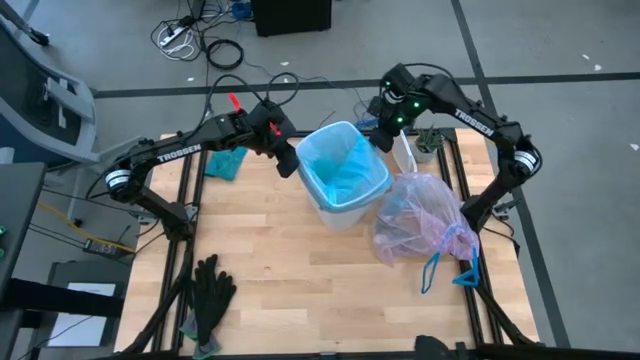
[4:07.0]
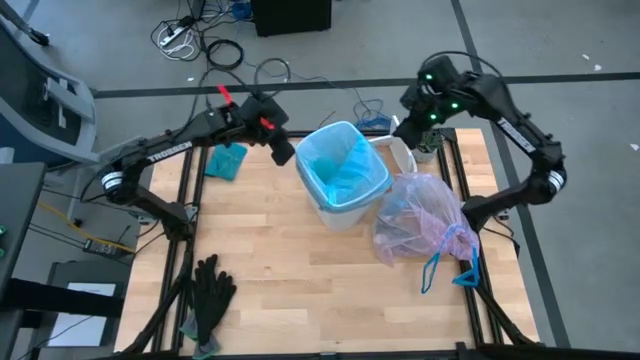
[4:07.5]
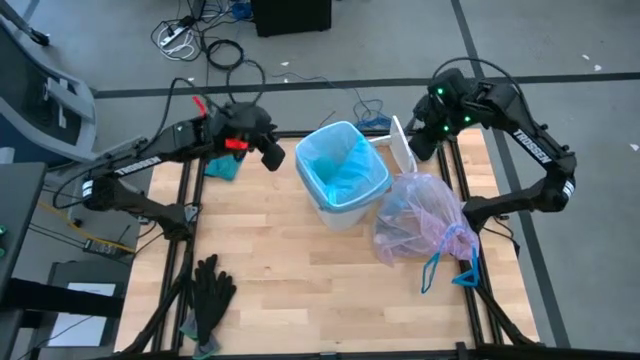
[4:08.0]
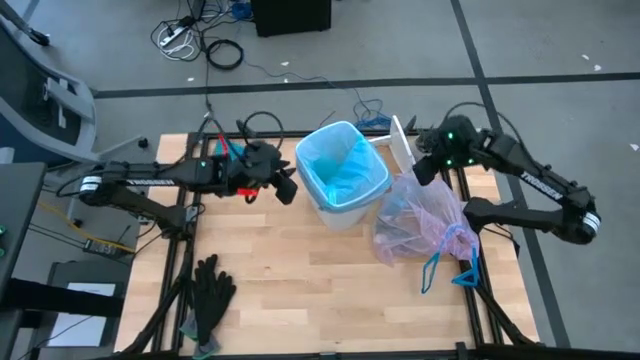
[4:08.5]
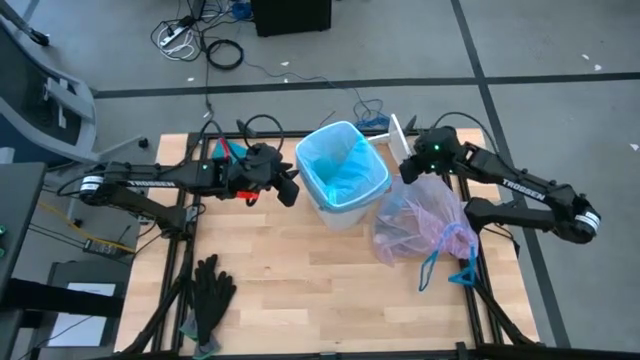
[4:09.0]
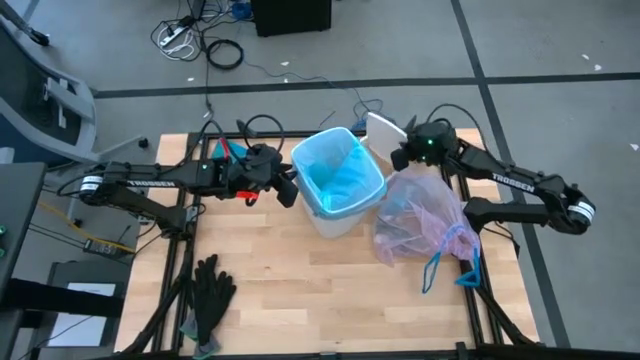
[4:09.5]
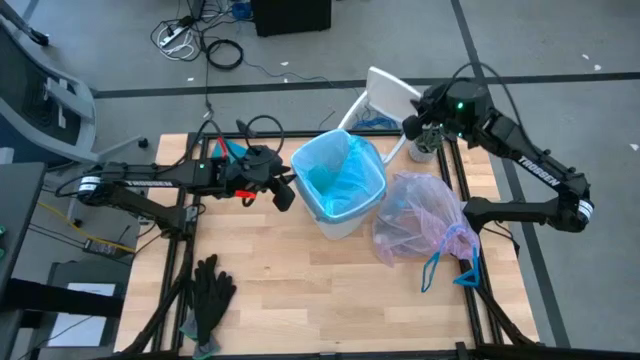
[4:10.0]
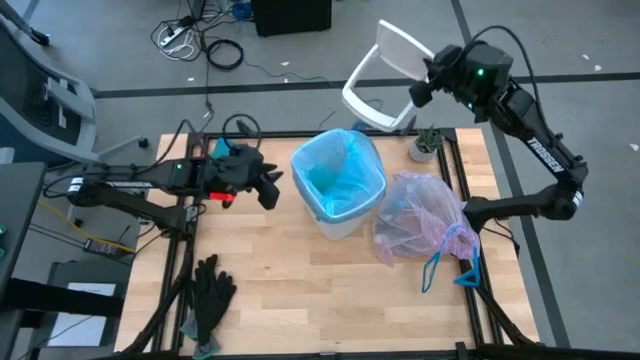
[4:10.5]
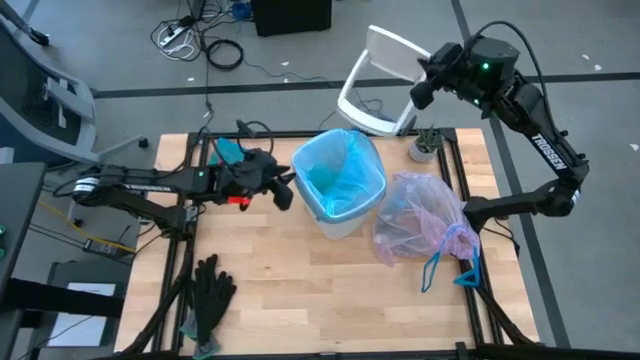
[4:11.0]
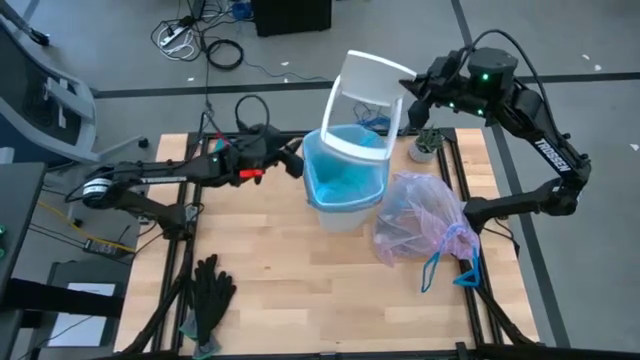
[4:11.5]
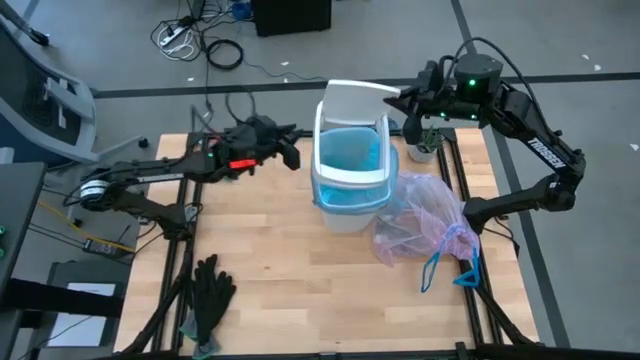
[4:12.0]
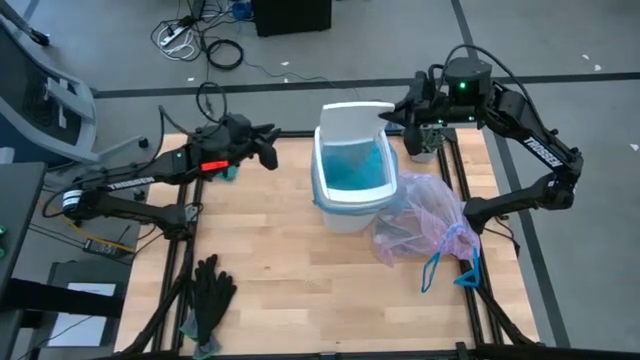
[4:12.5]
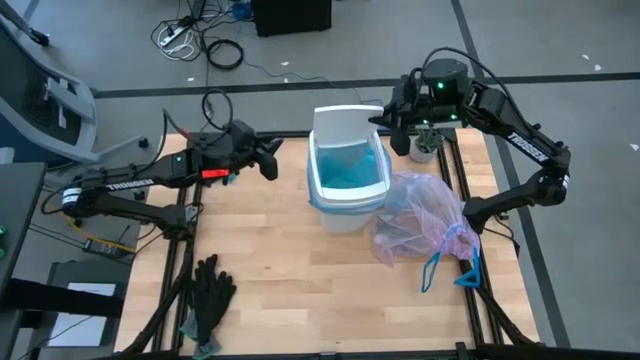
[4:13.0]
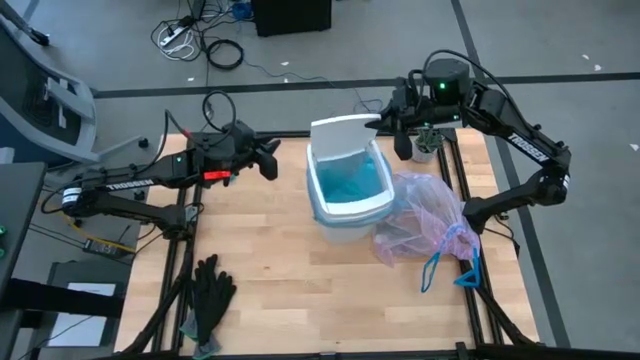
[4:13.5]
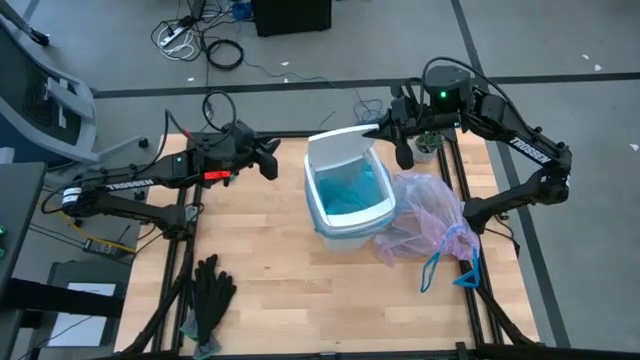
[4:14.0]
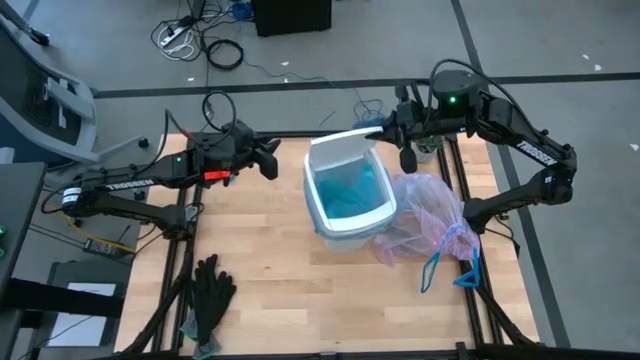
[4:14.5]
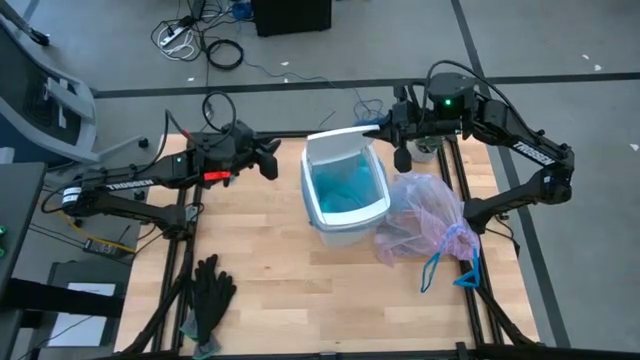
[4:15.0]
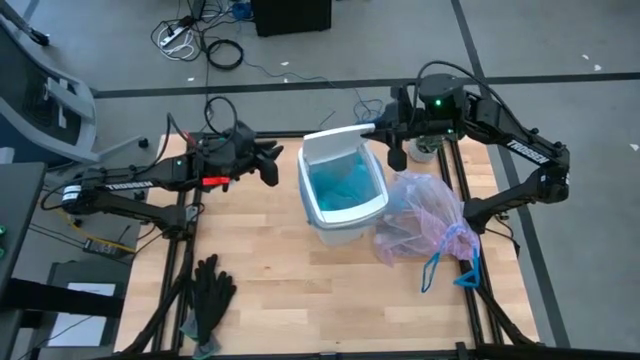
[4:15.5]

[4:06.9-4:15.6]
Task: place trash/remove bag and relplace
Put the white trash bin cover into the top of the trash bin

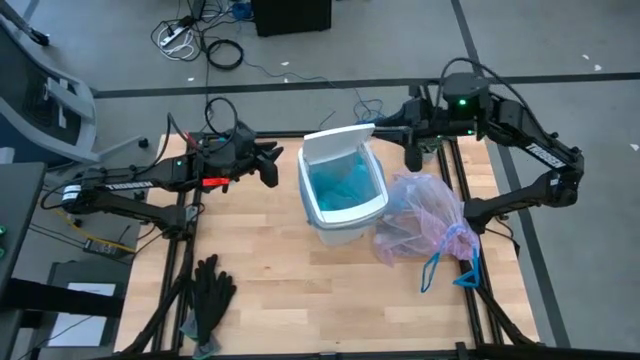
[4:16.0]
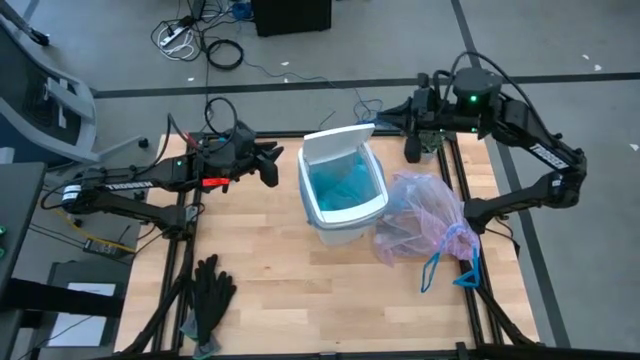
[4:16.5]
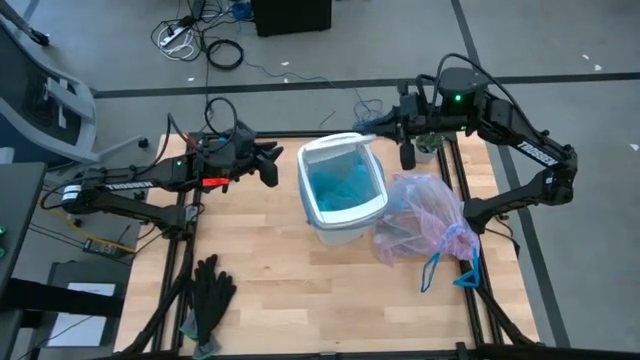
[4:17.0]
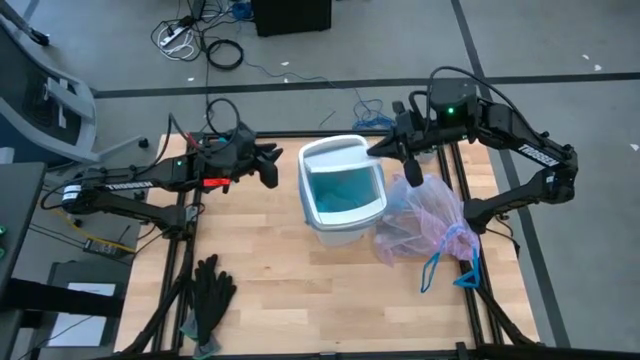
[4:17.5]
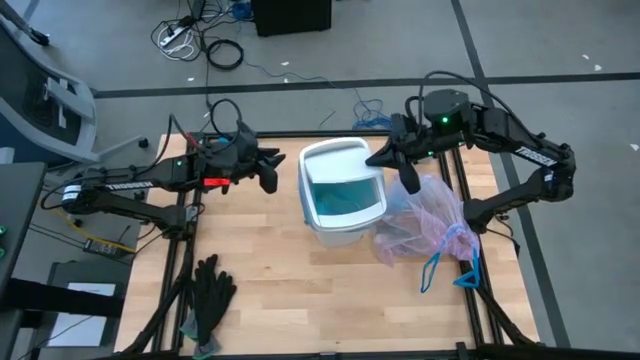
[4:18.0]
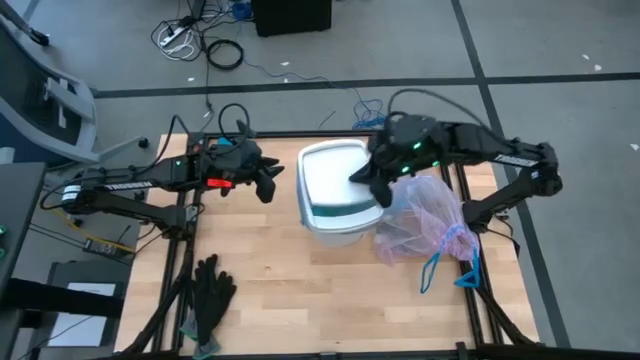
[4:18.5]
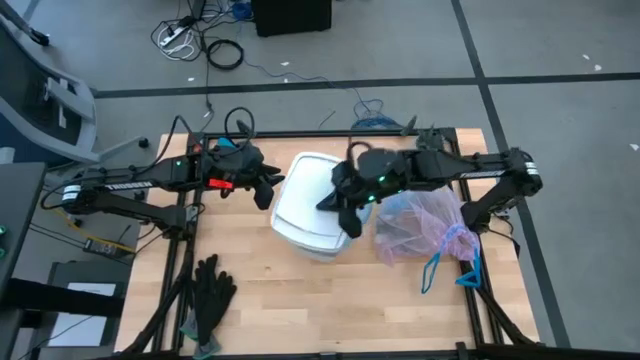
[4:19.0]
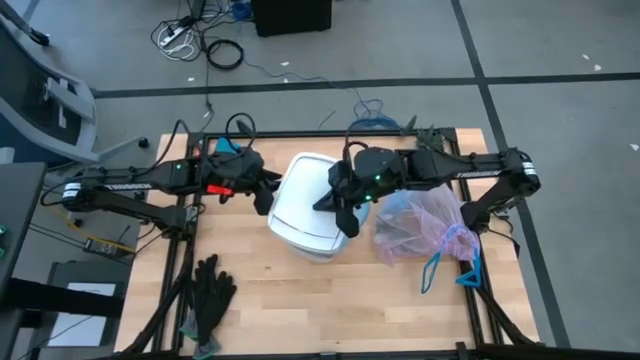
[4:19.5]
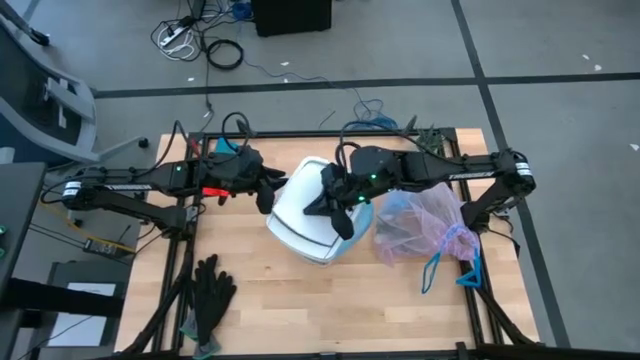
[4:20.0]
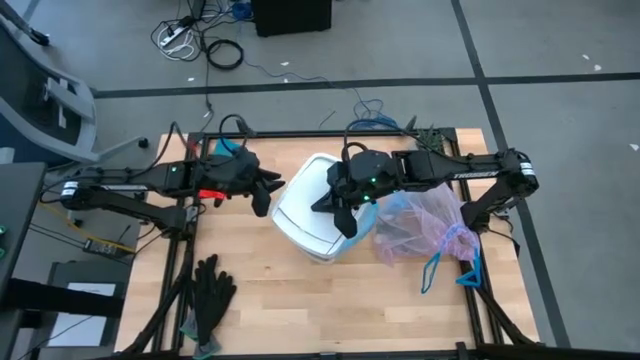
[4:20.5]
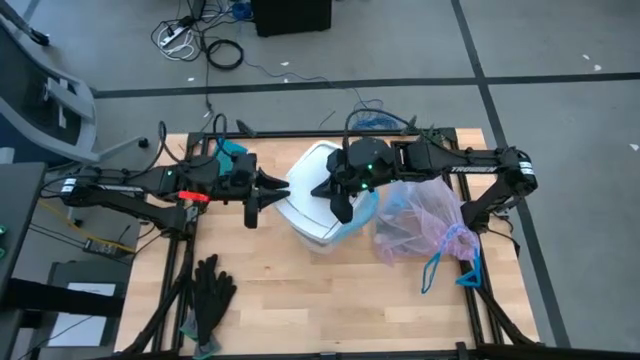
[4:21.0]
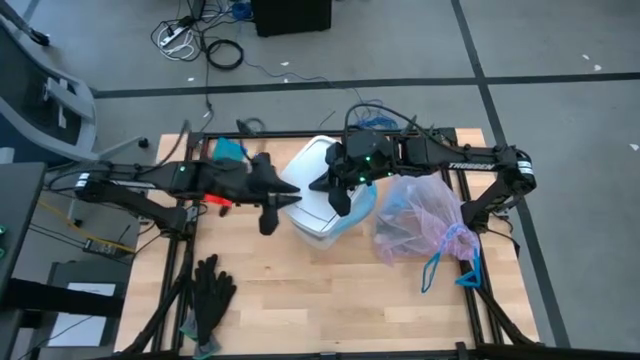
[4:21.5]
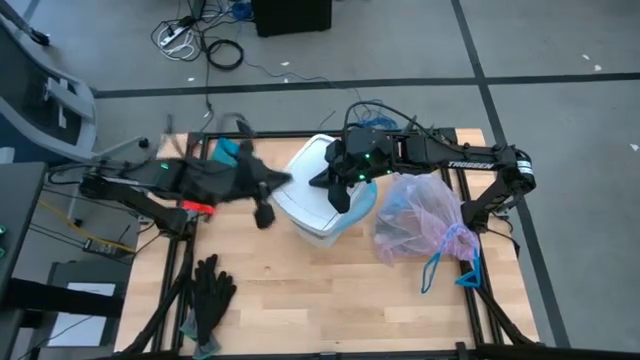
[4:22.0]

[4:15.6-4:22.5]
Close the trash bin lid

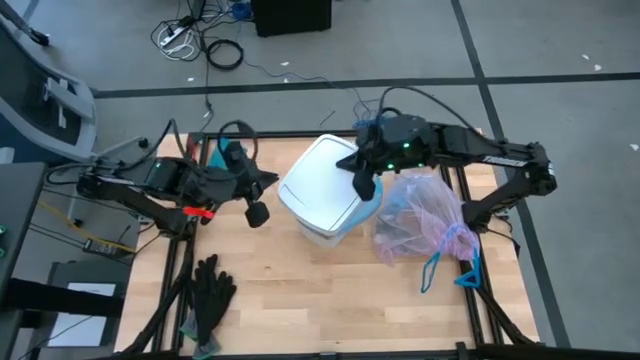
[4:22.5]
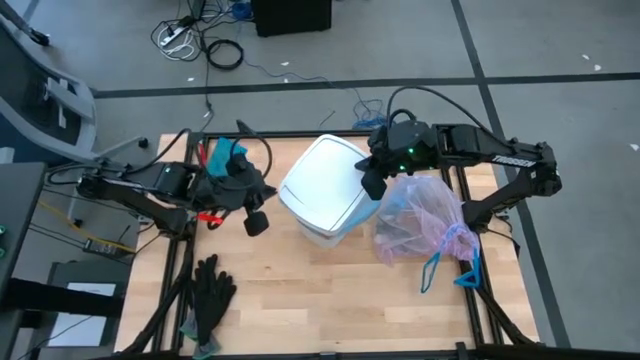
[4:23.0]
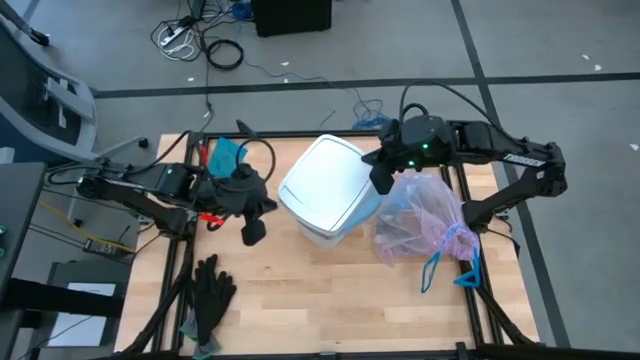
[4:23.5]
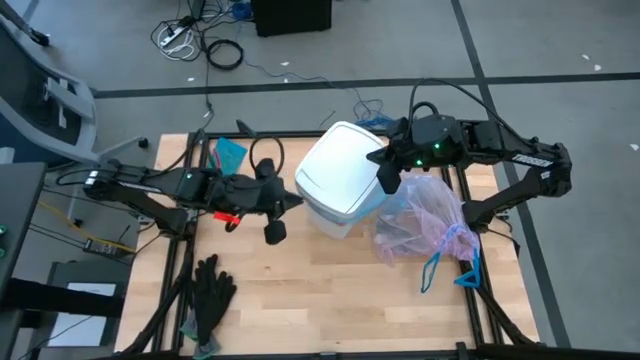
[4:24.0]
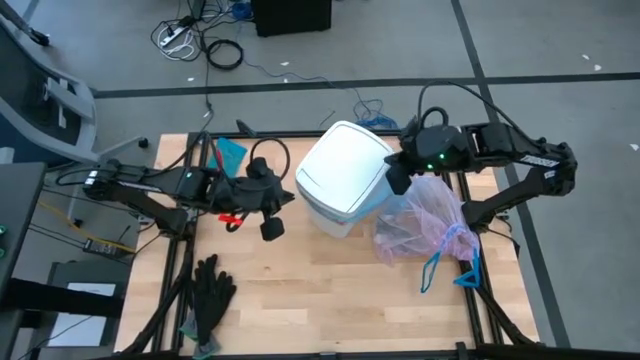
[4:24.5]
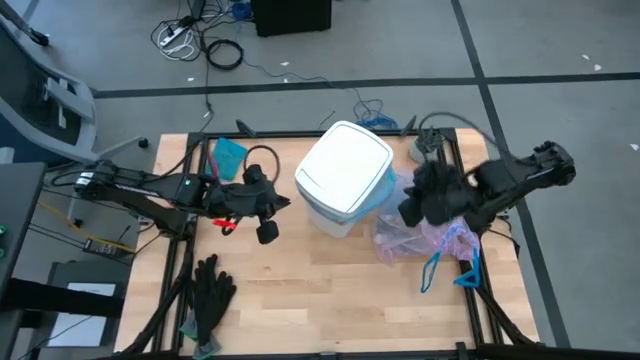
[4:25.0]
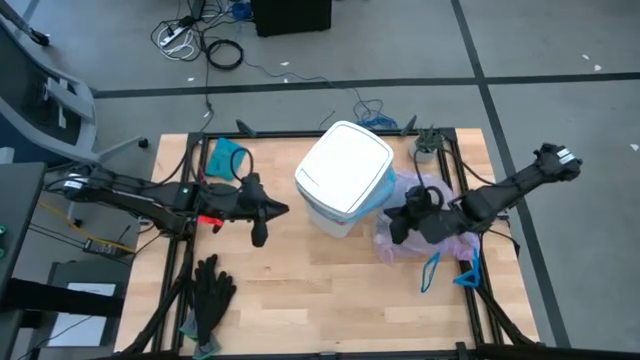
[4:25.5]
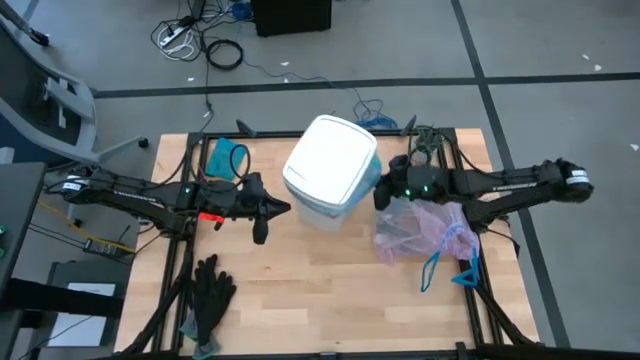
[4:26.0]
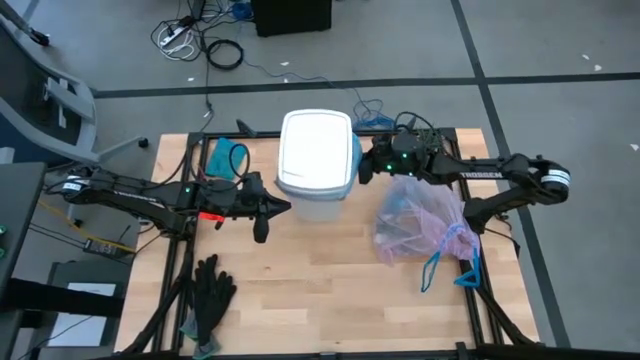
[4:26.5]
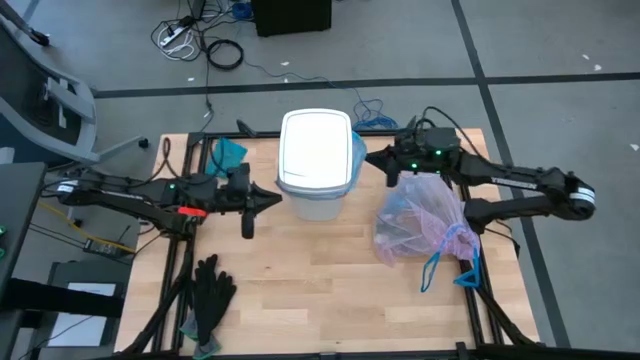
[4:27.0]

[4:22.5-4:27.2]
Adjust the white trash bin

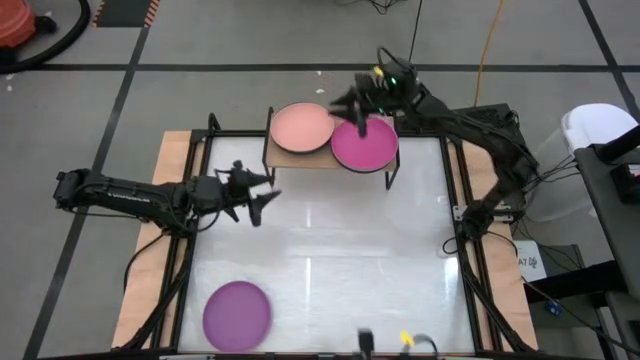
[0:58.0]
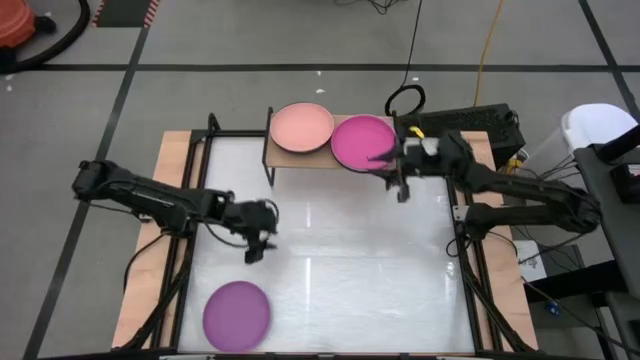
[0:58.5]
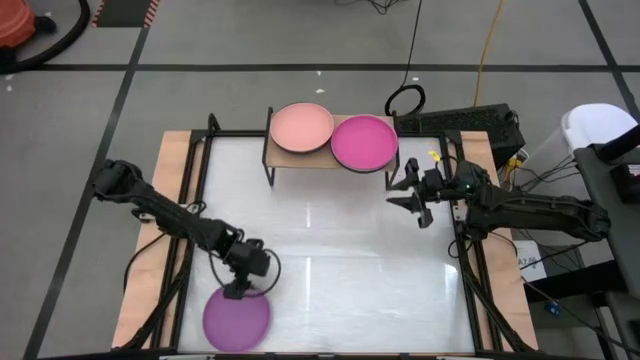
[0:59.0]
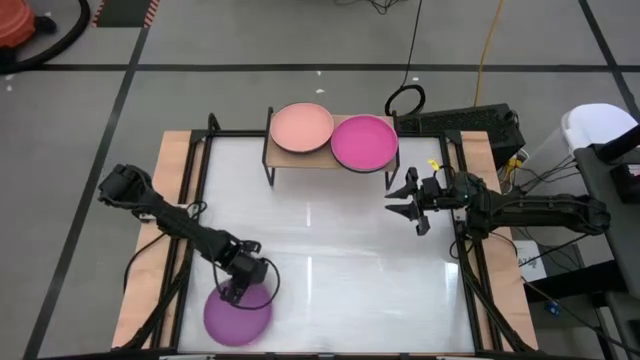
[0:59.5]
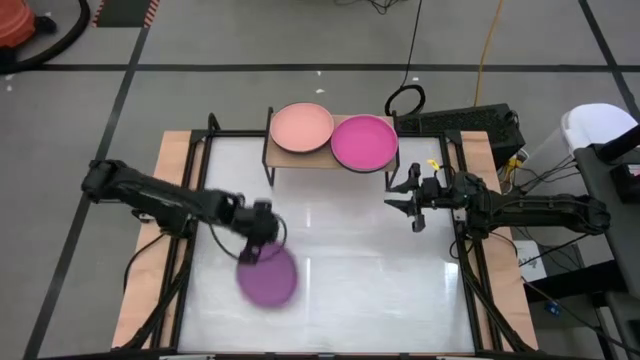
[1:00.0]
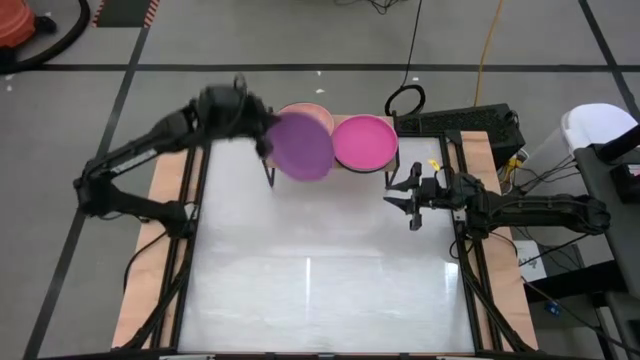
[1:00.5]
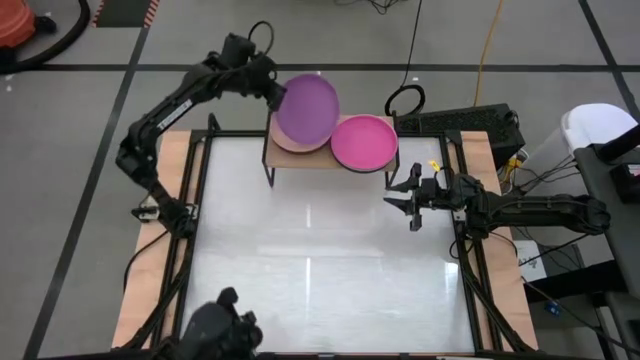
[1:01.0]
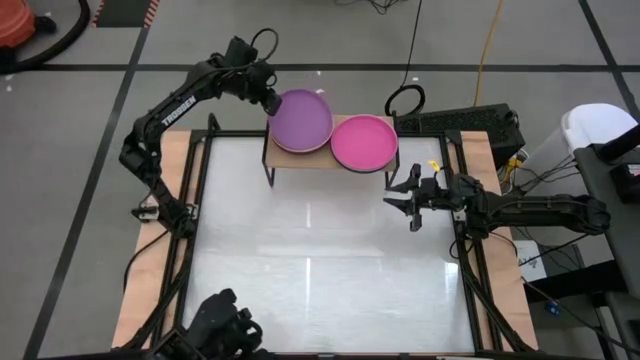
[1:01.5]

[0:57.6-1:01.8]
Task: Place and stack plates onto a shelf
Stack the violet plate on top of the orange plate on the shelf
